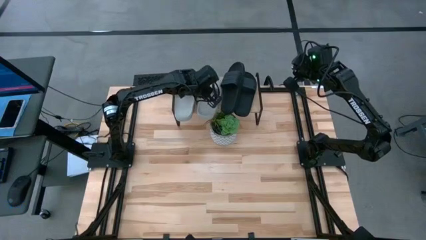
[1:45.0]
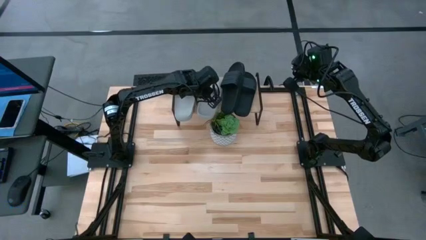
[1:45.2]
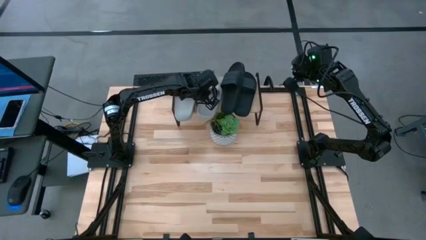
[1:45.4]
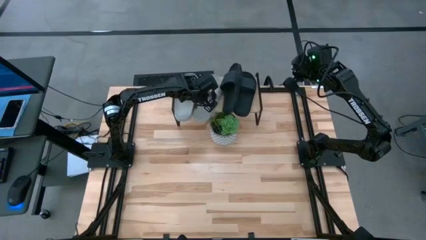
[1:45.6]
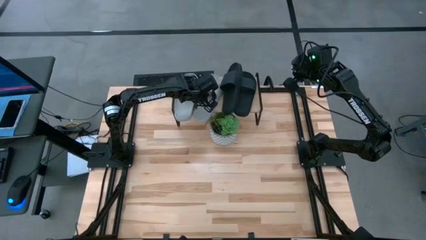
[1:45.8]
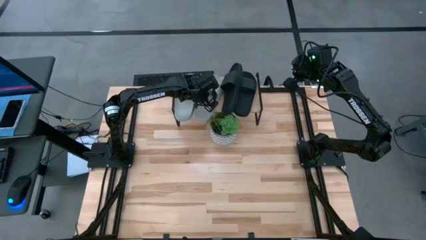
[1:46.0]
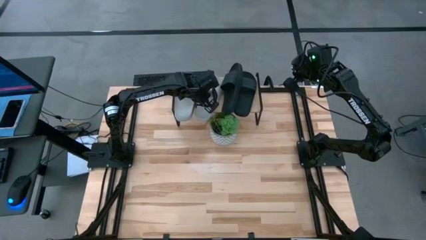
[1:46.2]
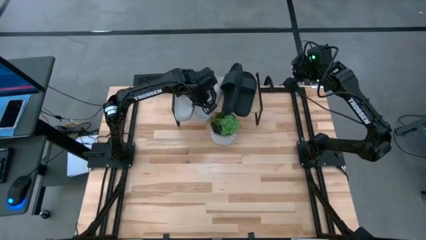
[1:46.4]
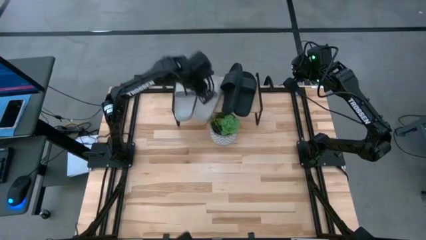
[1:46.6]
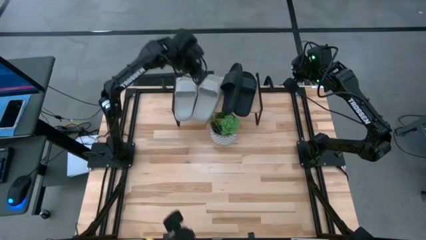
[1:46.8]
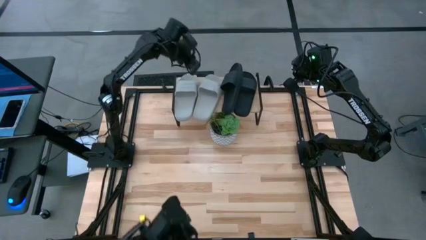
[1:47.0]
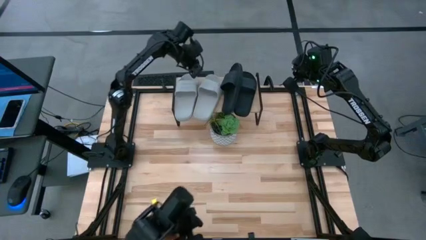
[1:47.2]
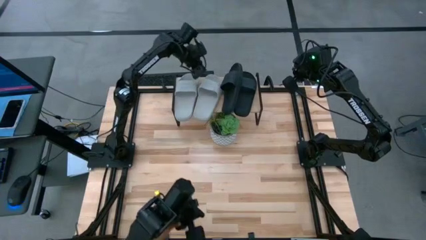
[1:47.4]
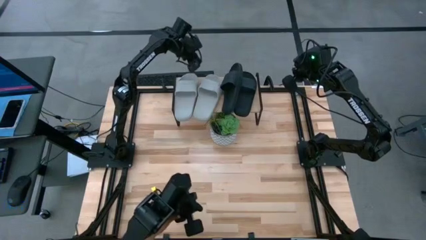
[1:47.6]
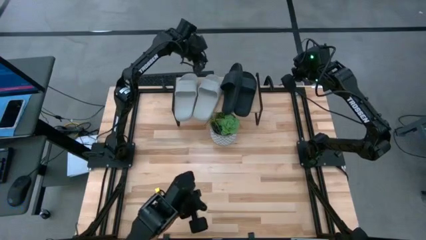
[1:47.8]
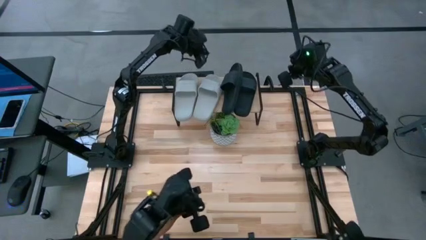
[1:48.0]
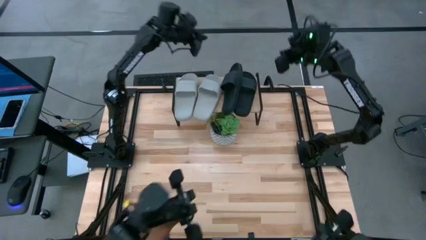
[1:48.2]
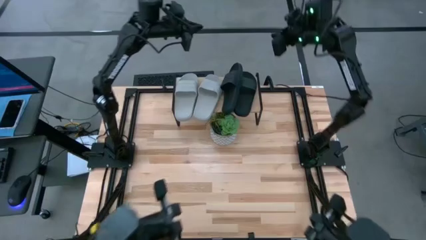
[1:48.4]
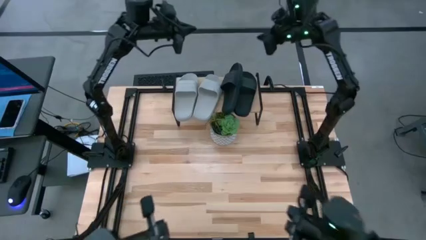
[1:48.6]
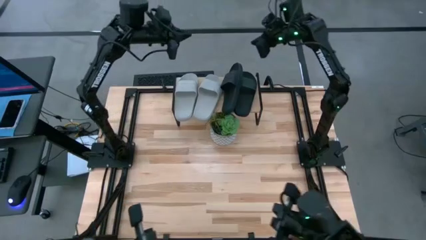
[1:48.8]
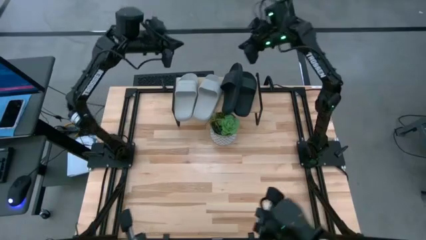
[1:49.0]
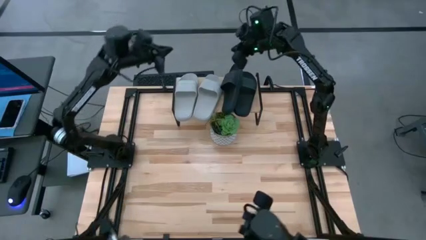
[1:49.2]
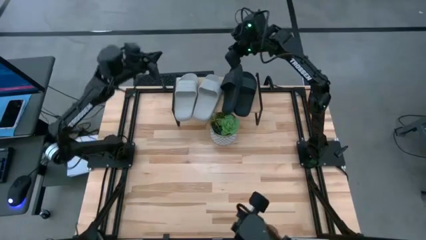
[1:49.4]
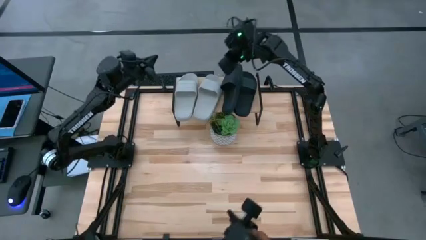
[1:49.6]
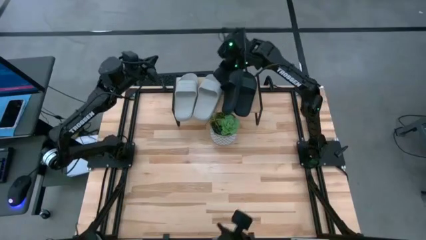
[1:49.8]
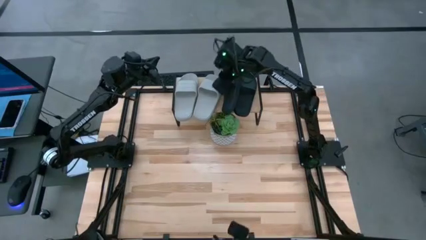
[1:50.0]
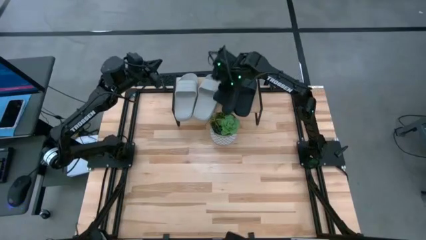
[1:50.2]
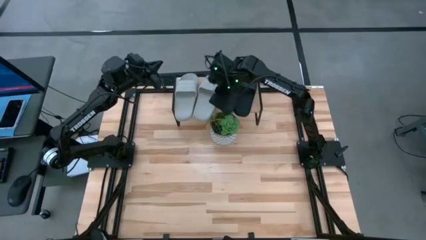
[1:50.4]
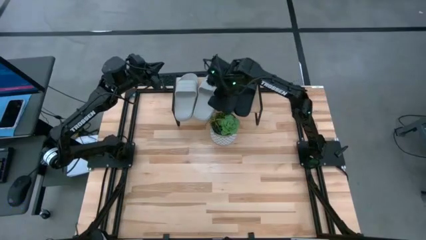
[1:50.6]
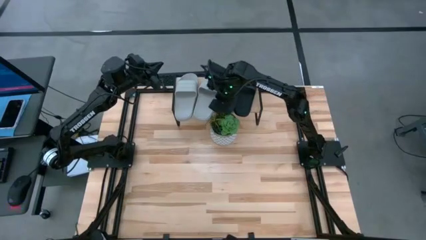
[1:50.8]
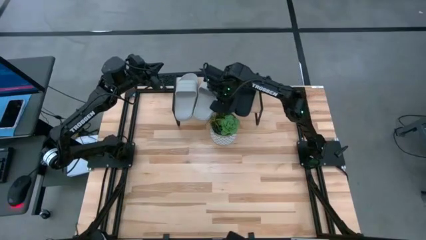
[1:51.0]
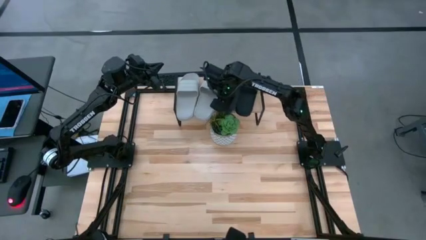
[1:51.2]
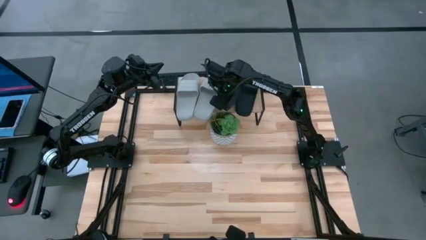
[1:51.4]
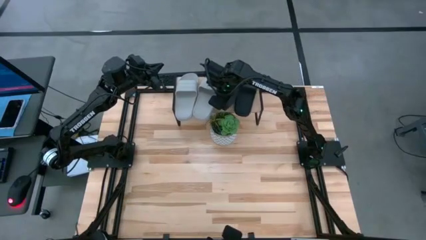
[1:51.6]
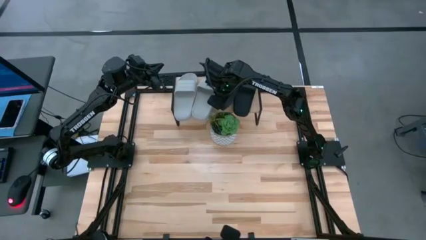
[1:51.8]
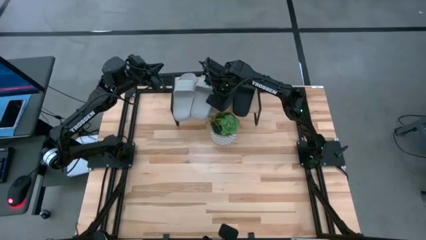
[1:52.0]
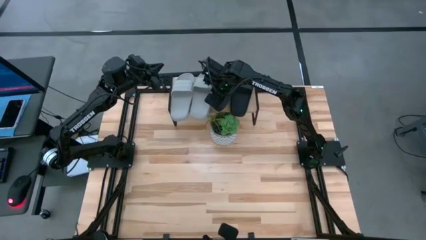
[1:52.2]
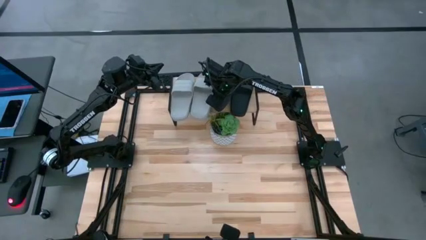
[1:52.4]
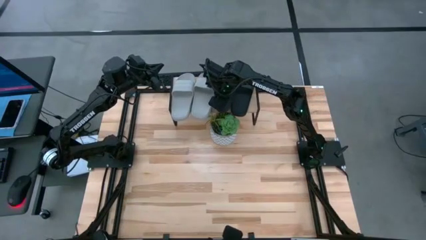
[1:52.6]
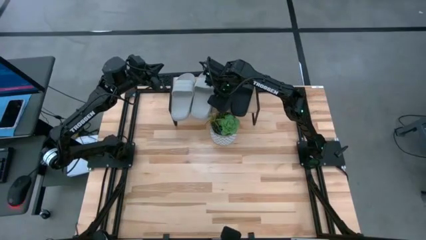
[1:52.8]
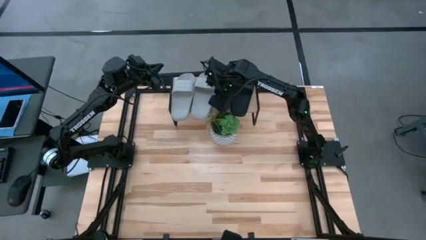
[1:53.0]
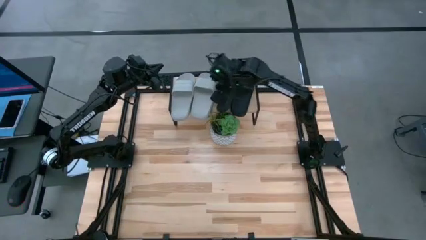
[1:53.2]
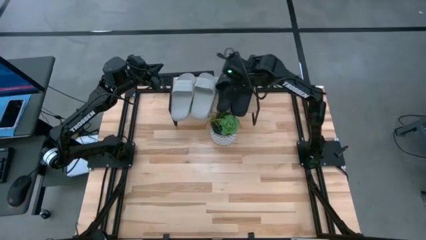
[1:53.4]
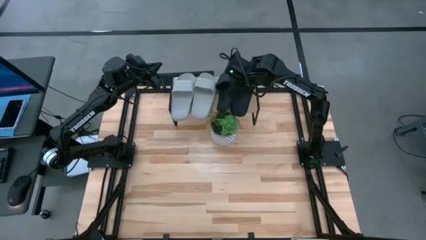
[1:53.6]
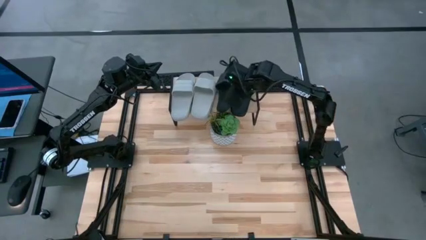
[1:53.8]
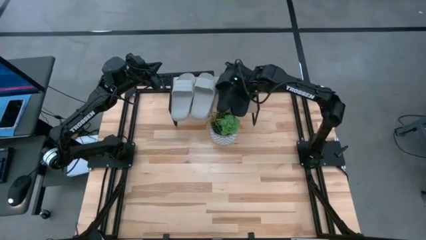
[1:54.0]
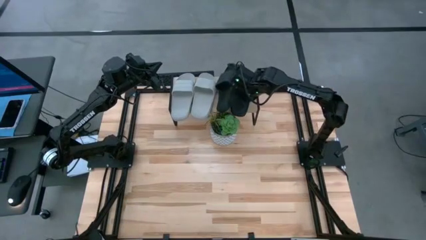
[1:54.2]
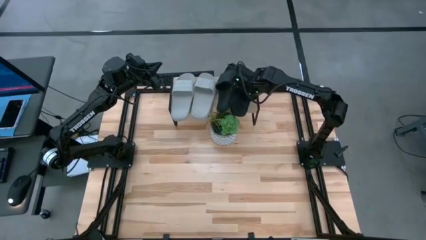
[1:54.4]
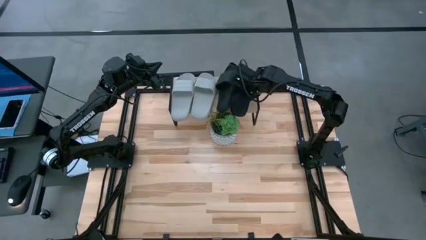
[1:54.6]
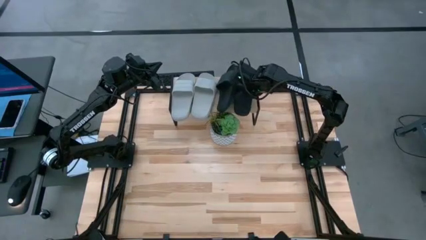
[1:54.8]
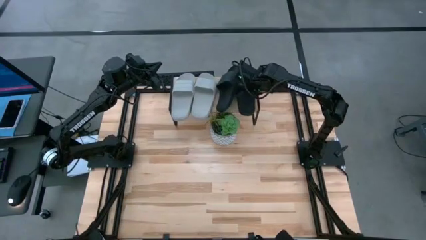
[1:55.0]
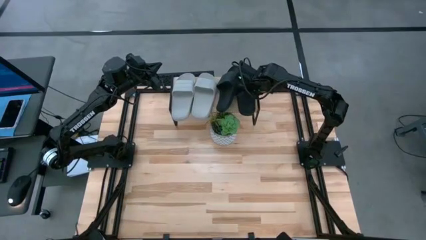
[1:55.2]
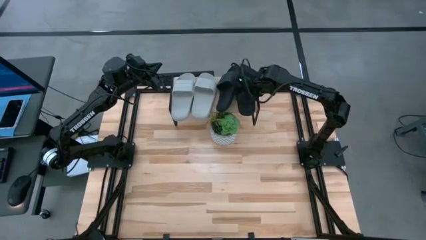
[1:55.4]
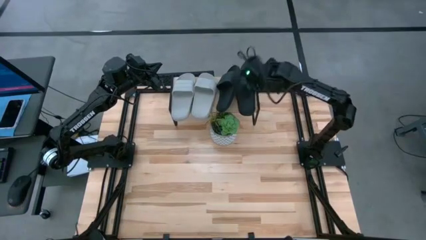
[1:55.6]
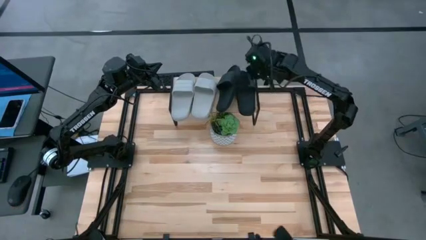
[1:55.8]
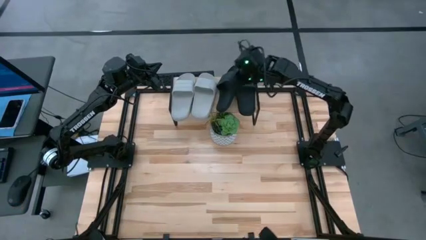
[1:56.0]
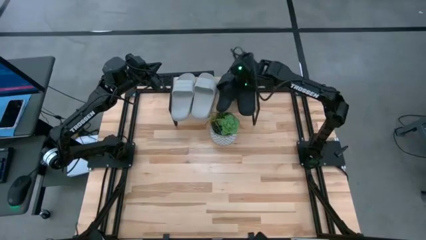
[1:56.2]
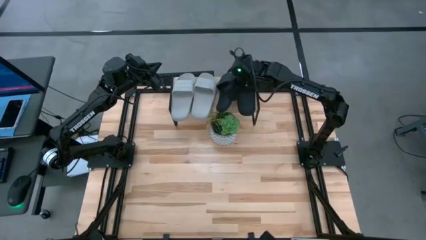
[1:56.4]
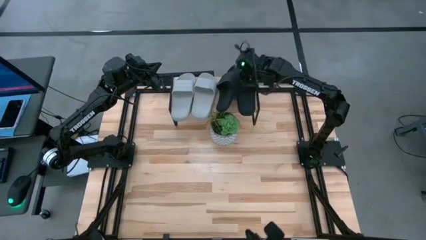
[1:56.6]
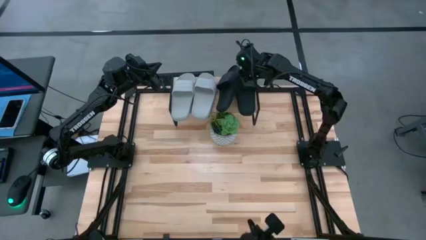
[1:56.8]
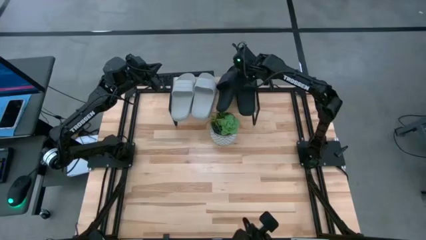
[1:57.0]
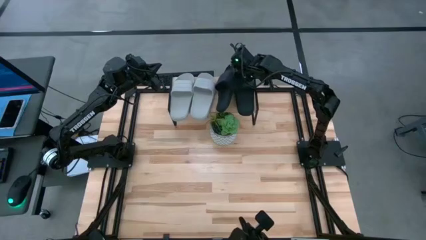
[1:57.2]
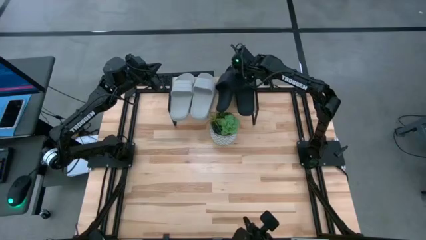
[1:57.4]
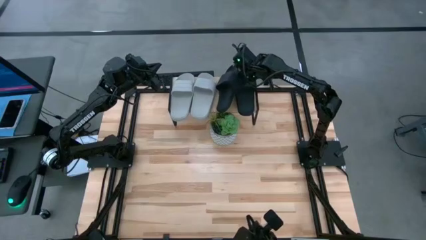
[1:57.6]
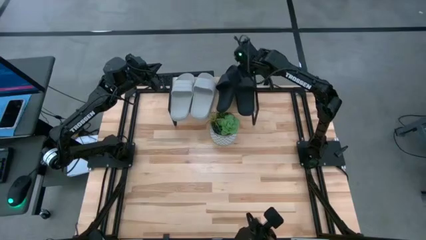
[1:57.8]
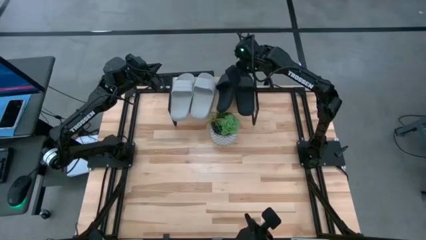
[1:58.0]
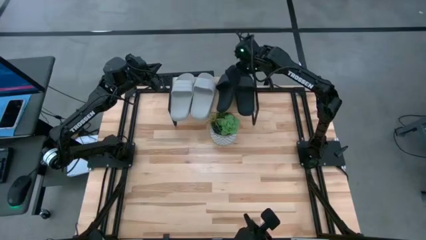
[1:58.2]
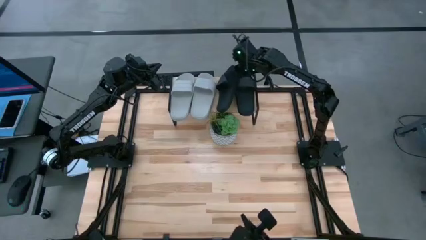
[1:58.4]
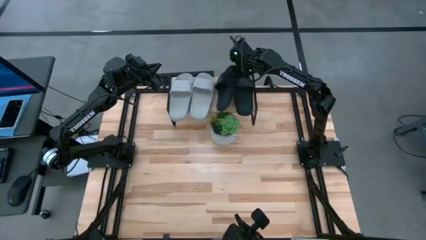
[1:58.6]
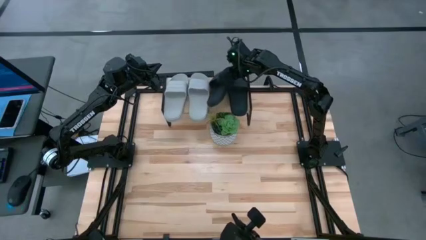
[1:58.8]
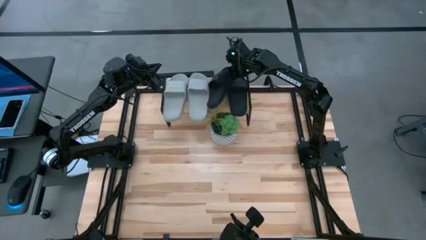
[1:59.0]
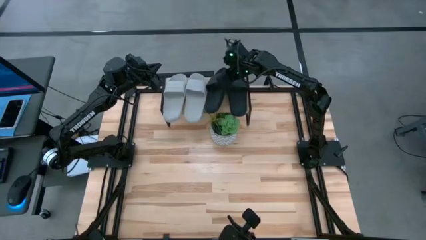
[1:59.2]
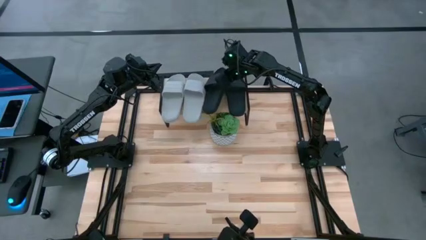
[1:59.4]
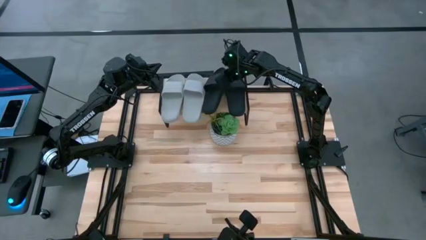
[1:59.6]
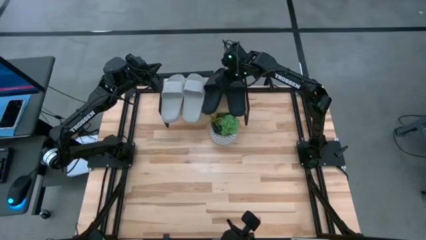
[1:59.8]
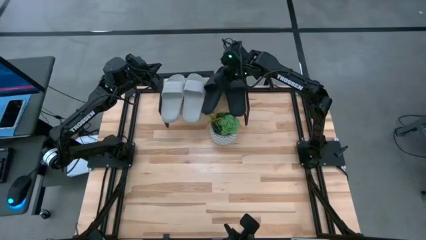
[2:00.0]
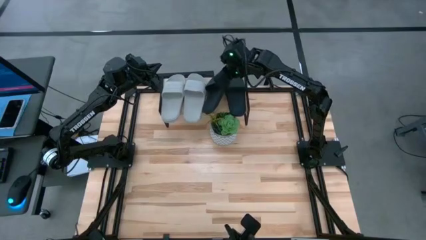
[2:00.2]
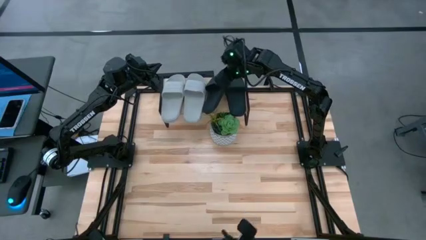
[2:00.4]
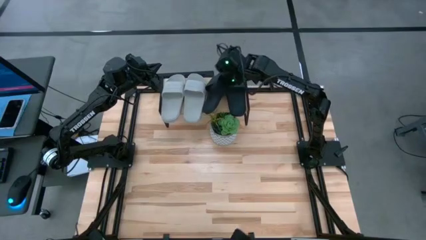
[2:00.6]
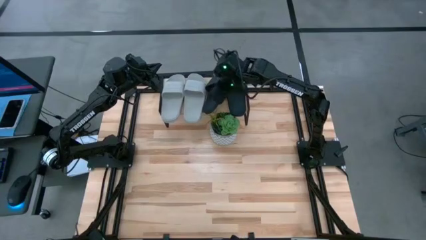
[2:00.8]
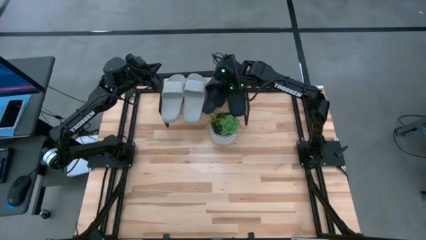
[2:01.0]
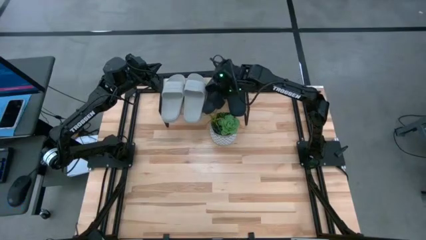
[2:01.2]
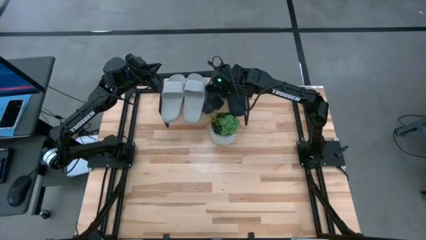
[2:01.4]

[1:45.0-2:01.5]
Task: Pick and place slides into the shelf
Adjust the slides on the shelf
